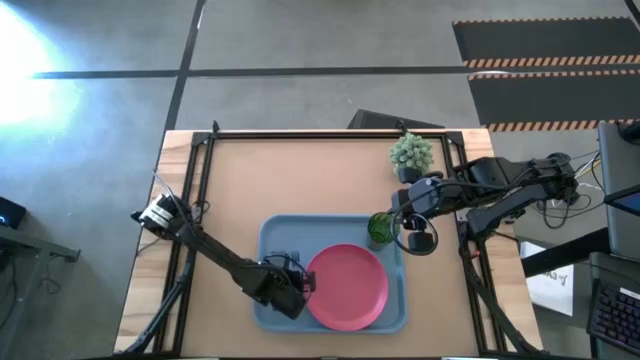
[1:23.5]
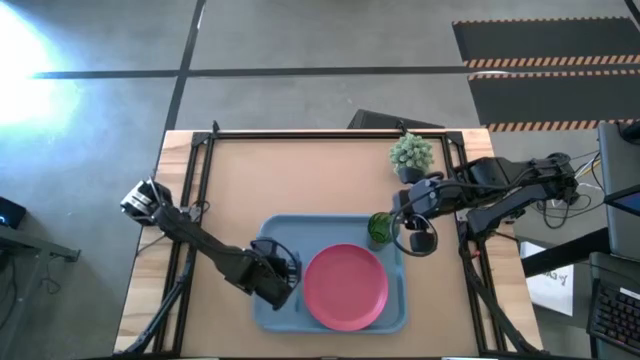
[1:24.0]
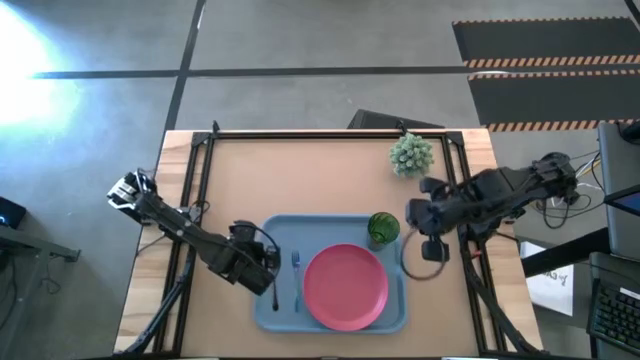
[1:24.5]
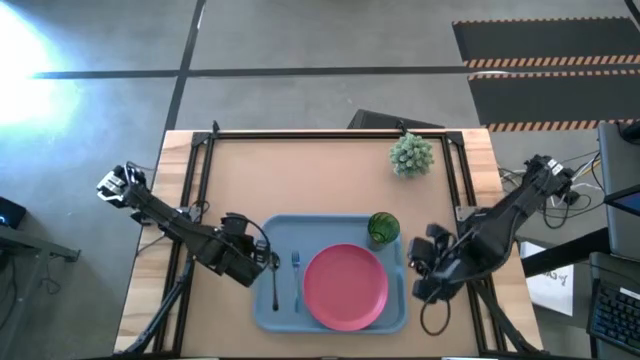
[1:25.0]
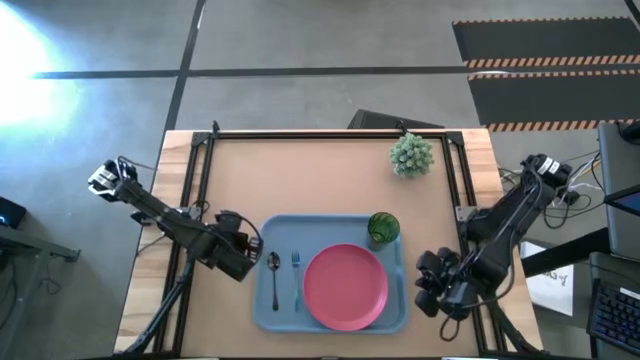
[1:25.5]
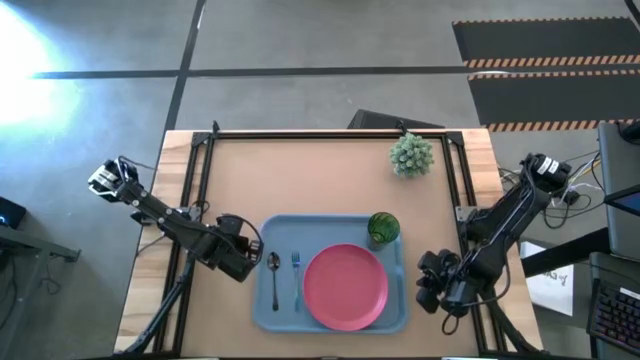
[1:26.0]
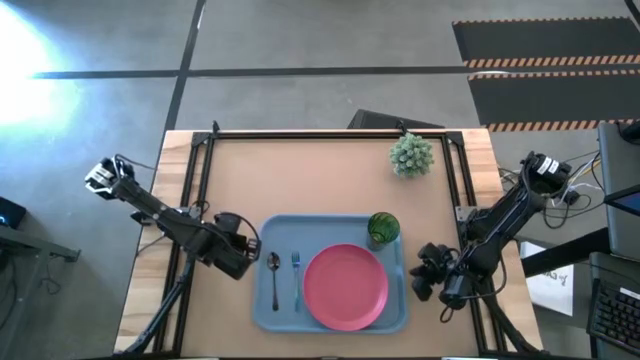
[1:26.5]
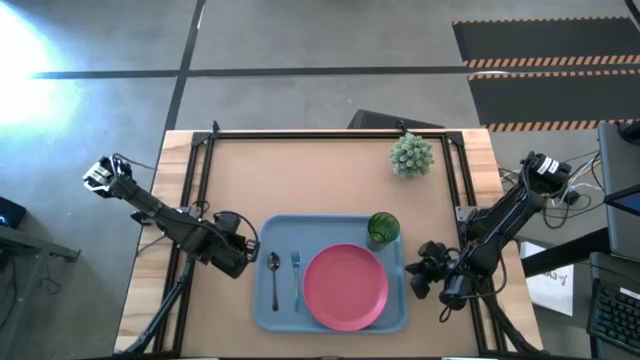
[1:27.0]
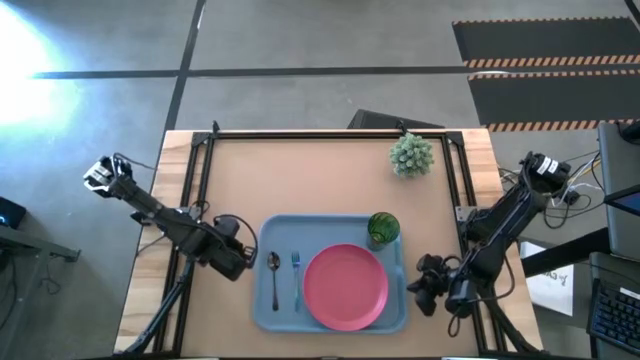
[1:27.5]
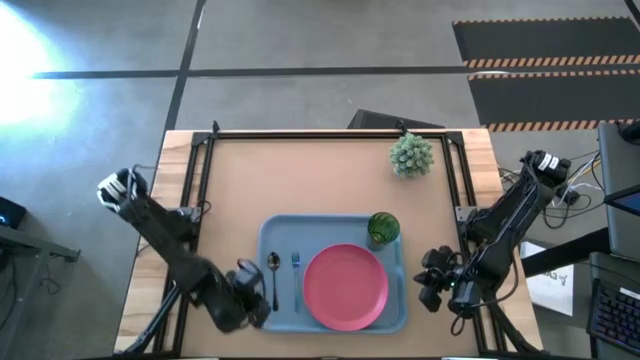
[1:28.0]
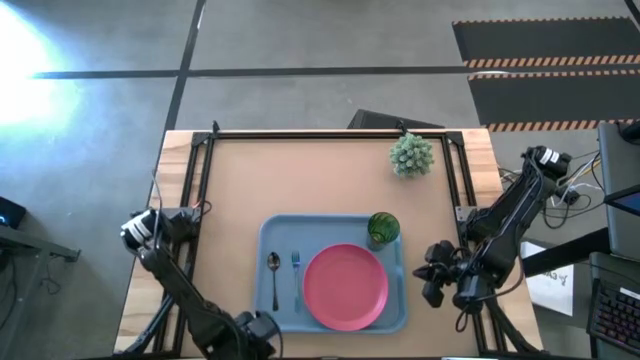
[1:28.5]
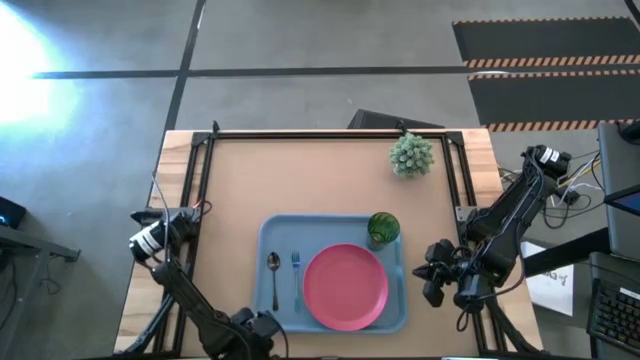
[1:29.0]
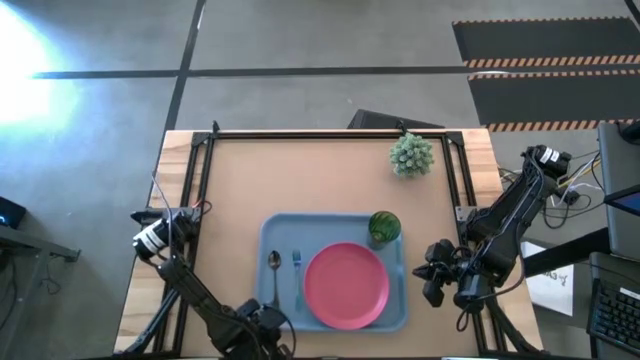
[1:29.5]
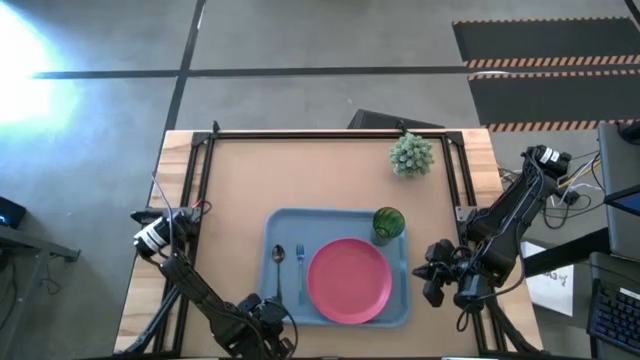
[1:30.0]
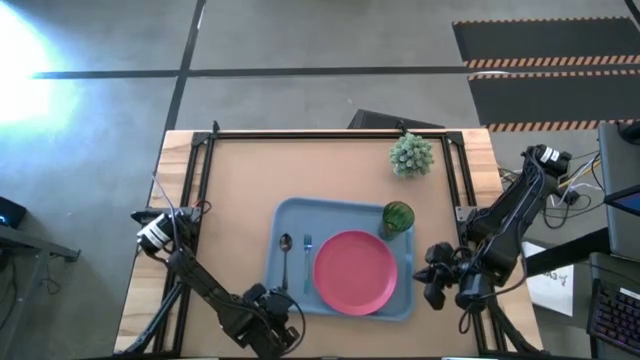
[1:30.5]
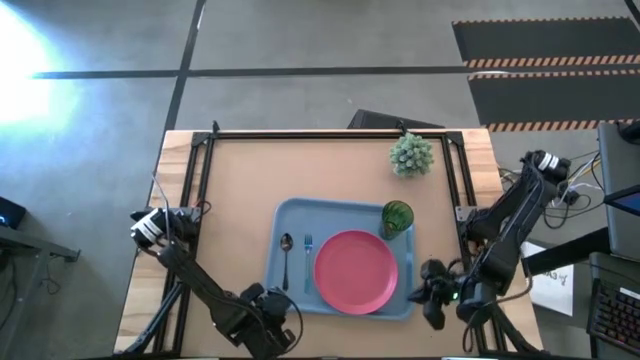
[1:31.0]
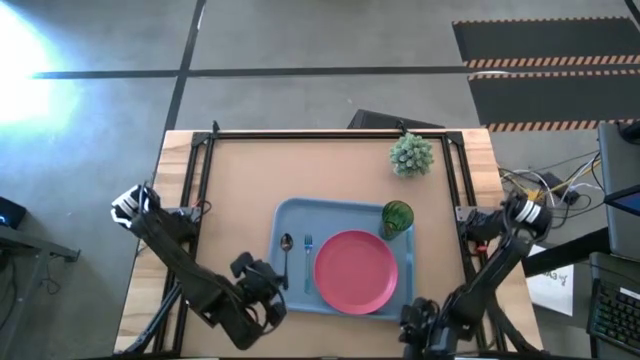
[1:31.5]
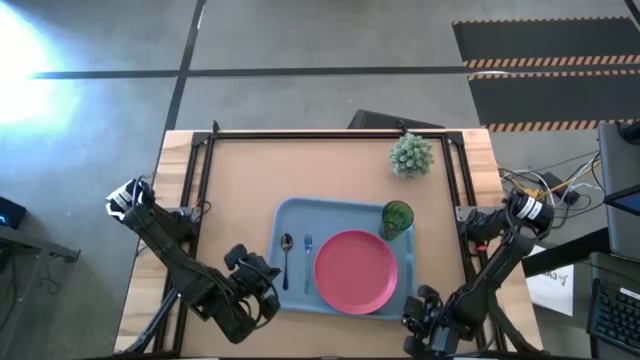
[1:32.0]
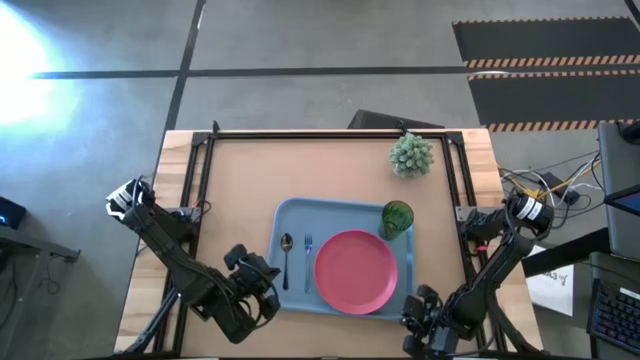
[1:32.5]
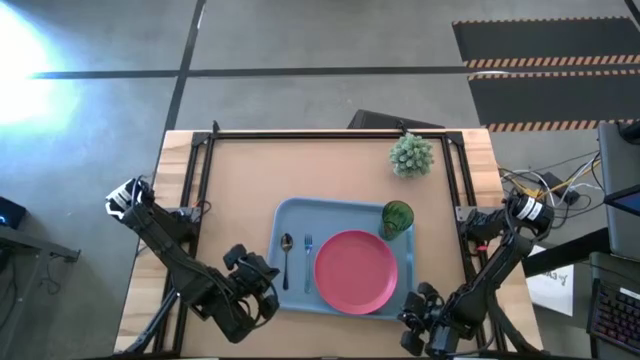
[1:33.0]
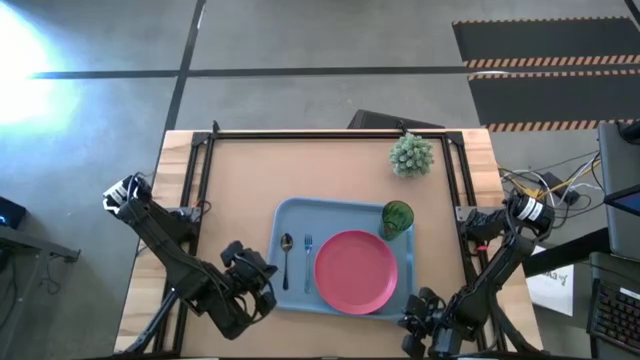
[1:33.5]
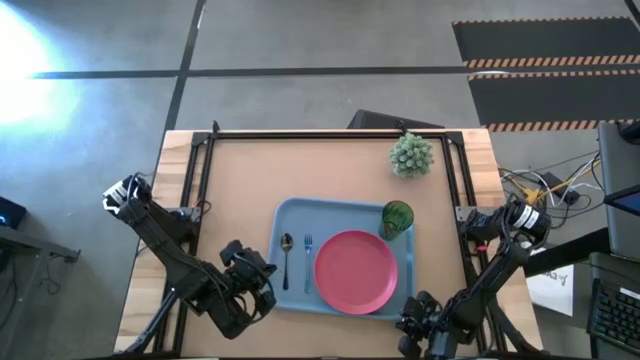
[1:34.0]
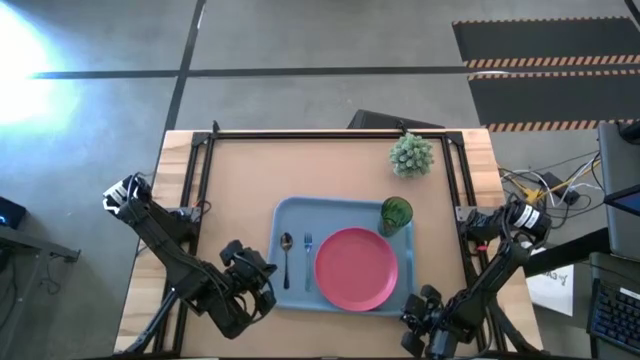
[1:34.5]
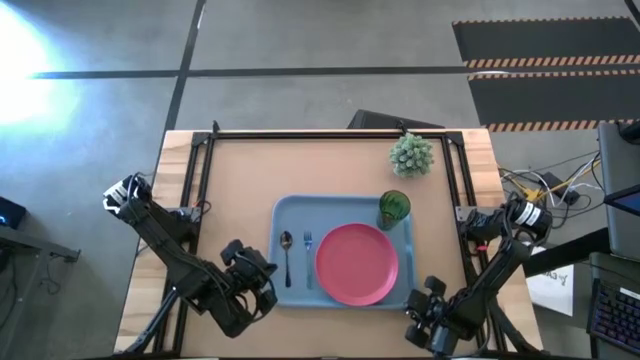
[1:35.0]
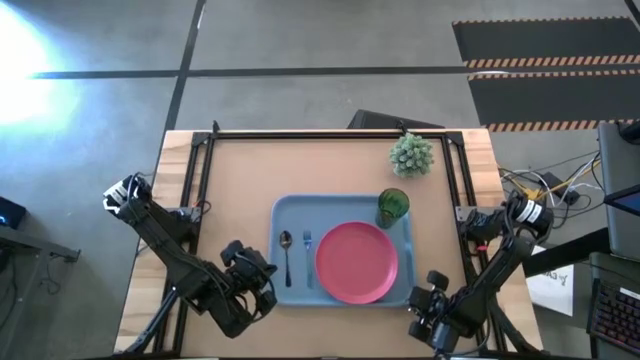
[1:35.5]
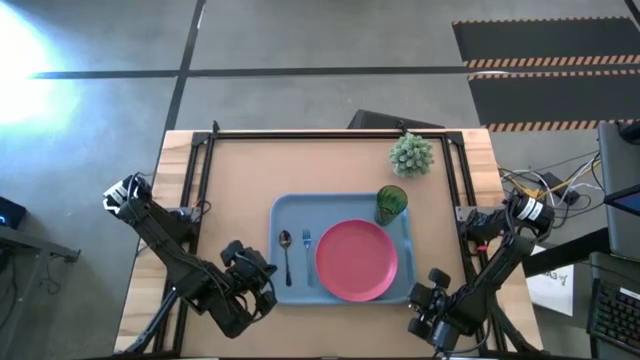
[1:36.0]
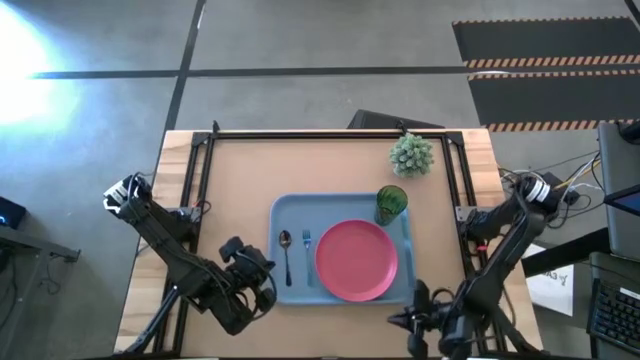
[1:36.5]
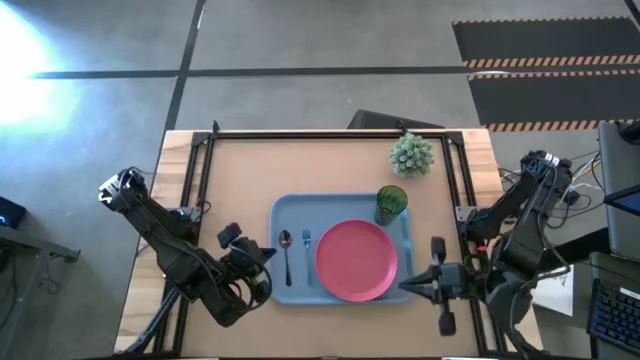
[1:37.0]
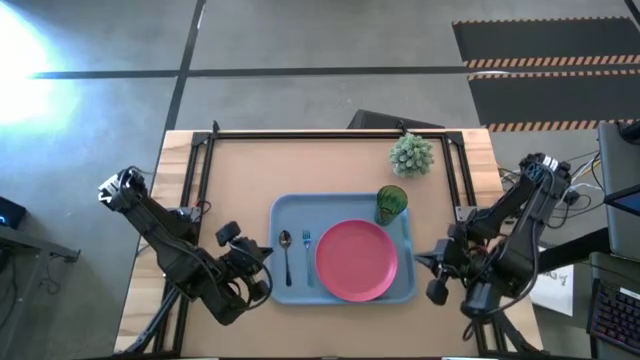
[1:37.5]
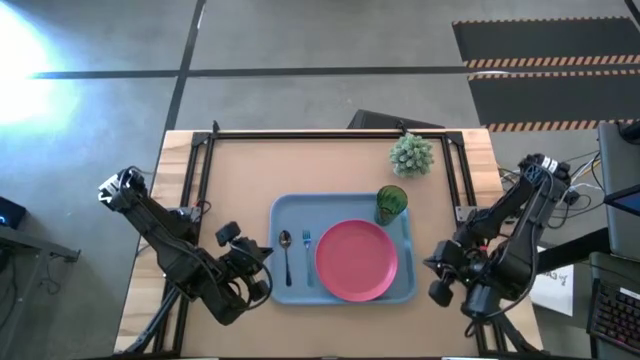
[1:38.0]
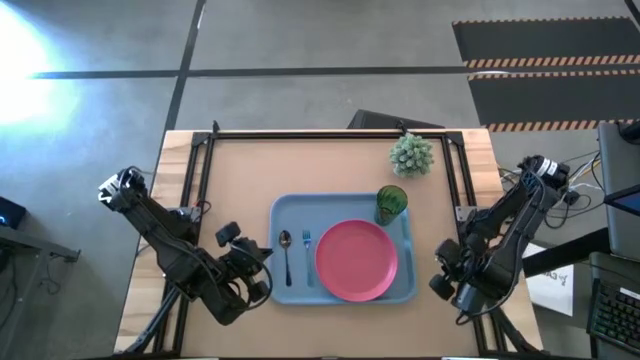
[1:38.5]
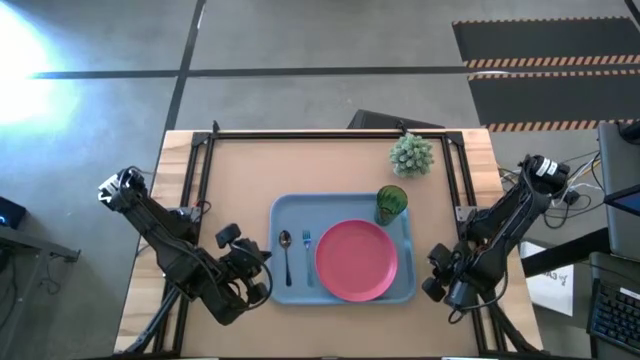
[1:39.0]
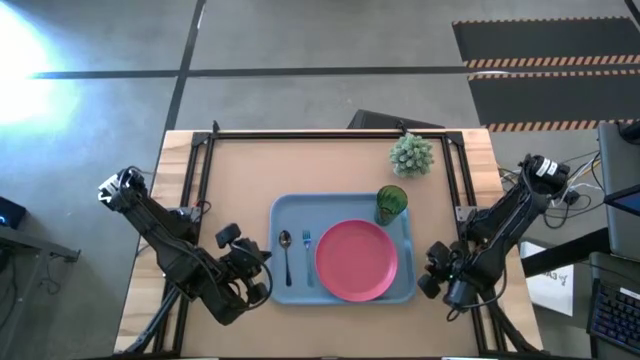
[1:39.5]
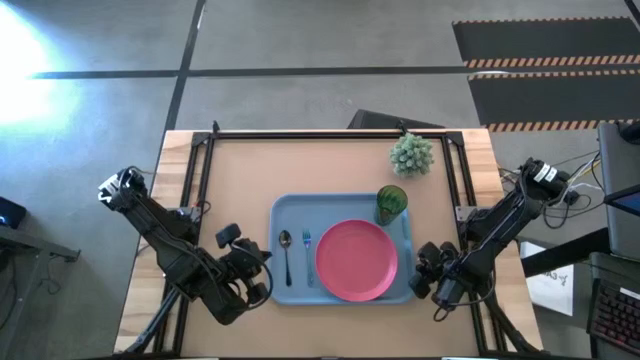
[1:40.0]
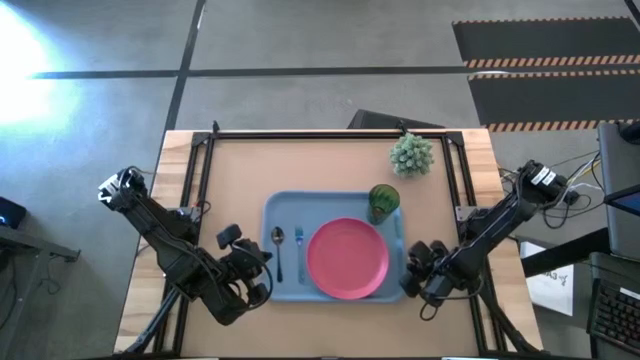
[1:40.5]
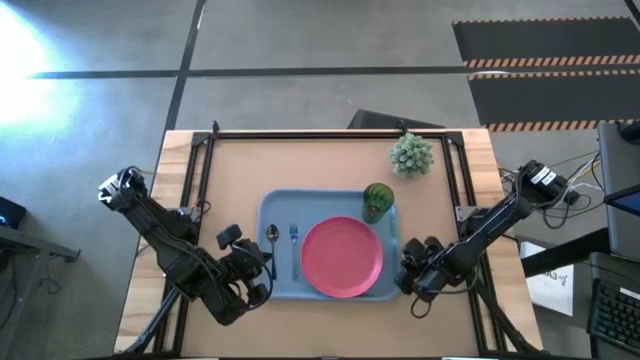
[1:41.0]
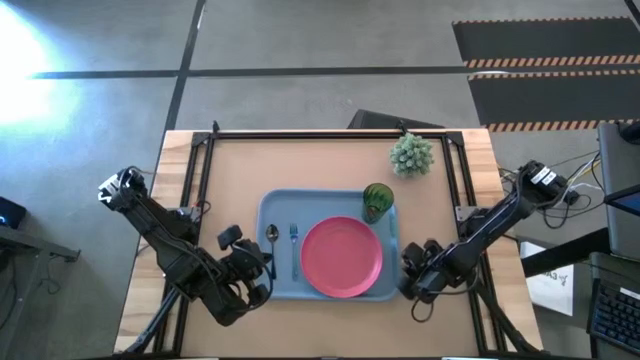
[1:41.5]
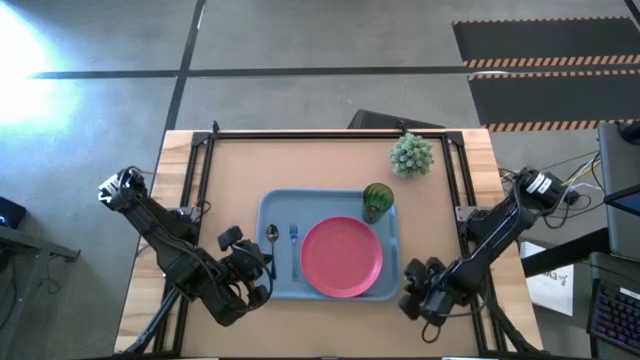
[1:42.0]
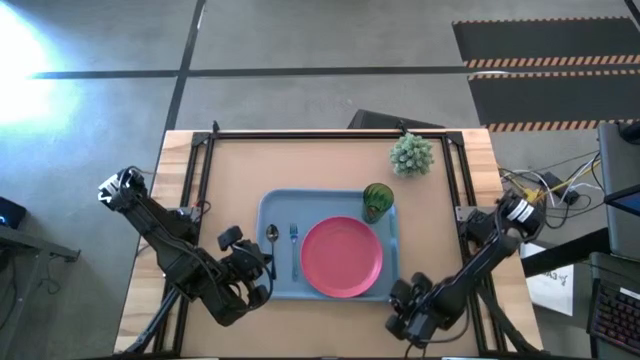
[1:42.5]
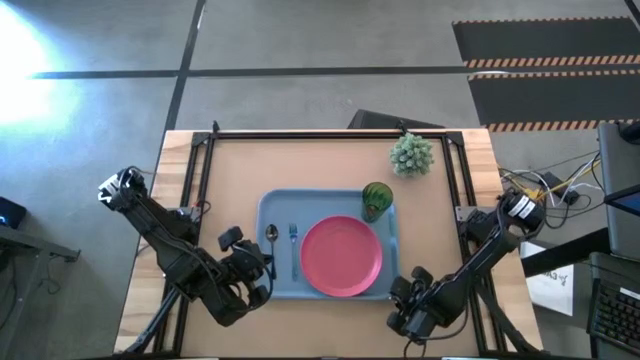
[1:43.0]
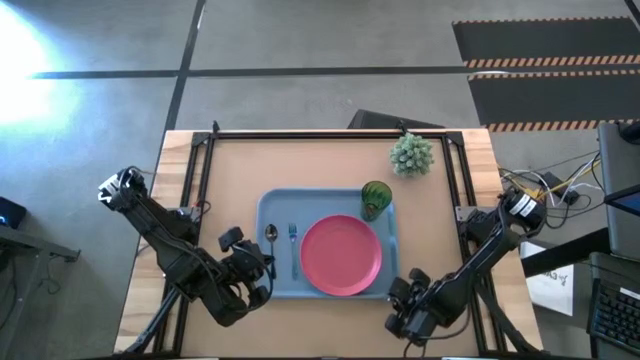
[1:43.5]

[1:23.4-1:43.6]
Task: Pick and place plate/cup/fork/spoon on tray
Adjust the blue serving tray

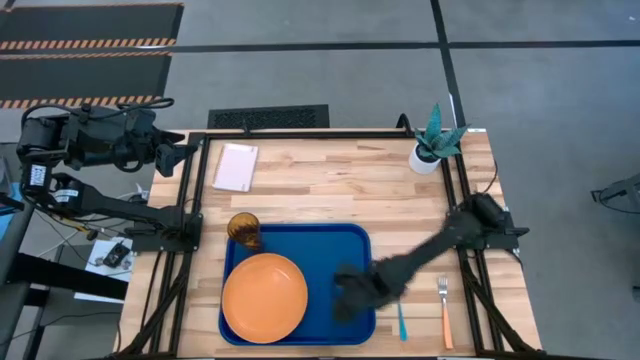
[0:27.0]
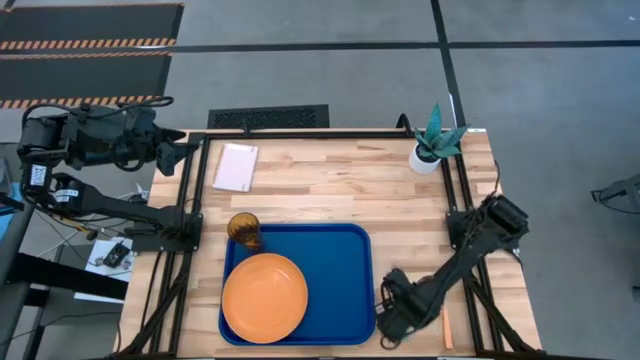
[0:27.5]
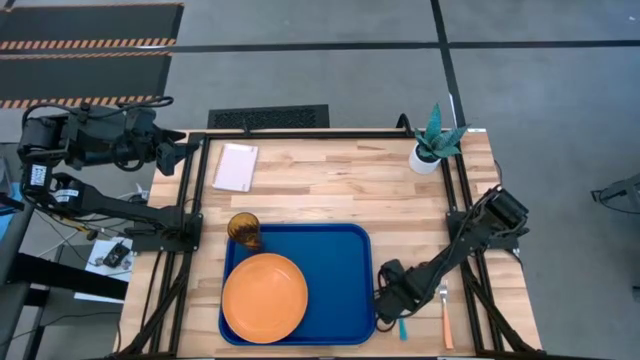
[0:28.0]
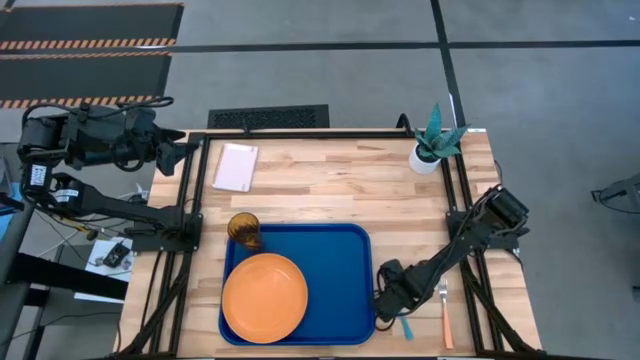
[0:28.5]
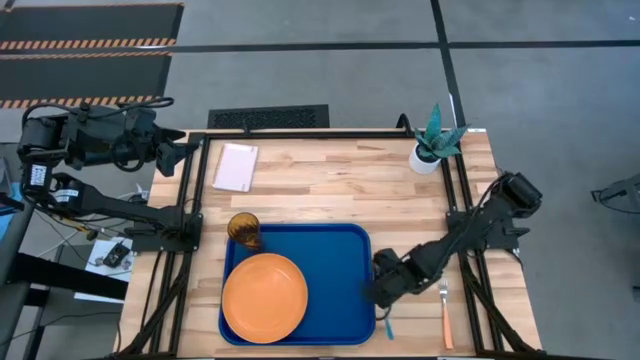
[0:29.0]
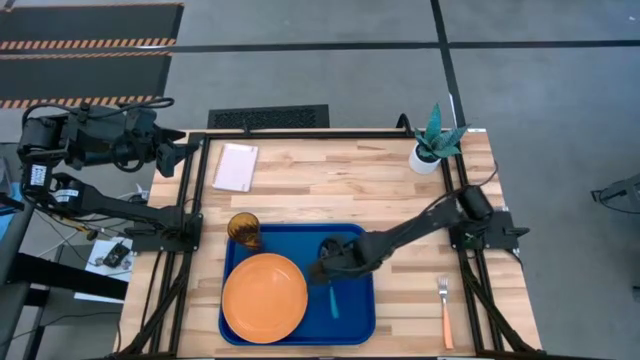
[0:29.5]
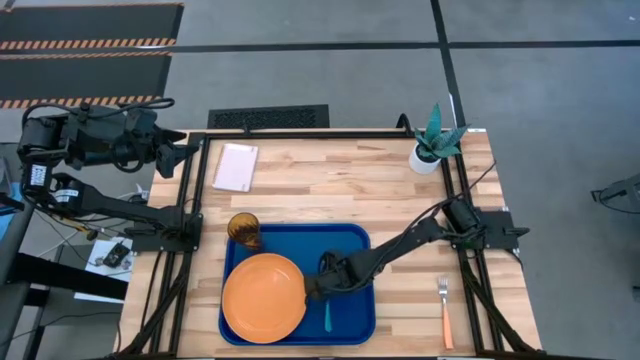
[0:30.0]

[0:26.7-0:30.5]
Task: Pick and place plate/cup/fork/spoon on tray
Put the blue spoon on the blue tray to the right of the orange plate
